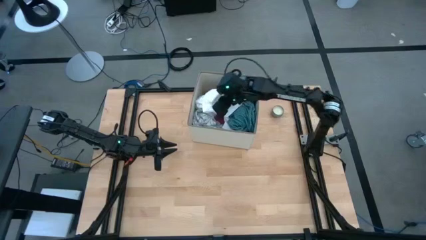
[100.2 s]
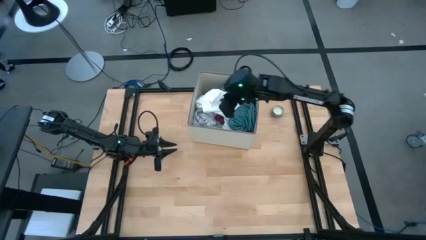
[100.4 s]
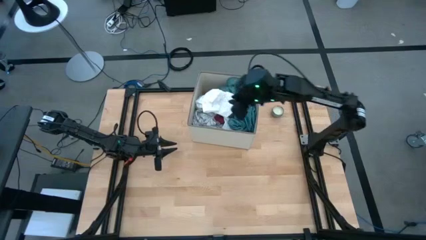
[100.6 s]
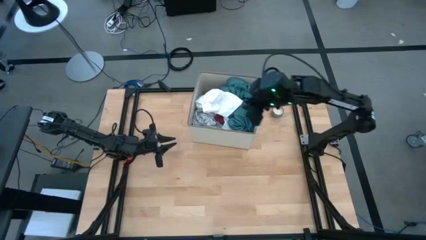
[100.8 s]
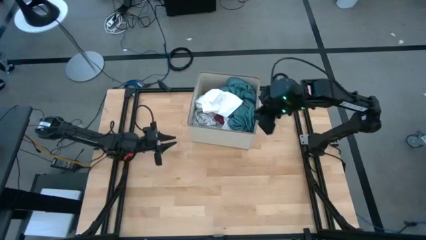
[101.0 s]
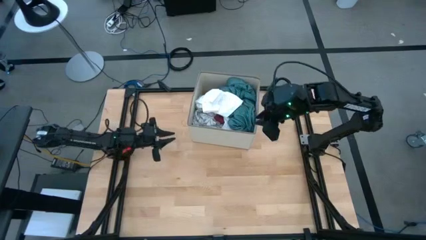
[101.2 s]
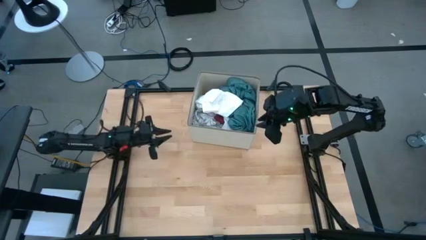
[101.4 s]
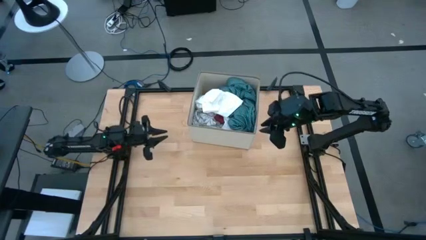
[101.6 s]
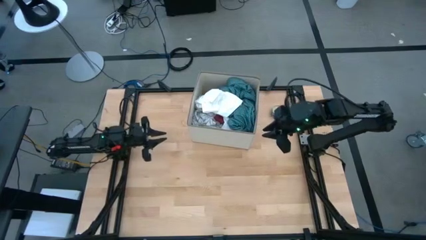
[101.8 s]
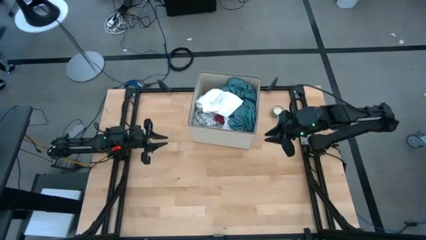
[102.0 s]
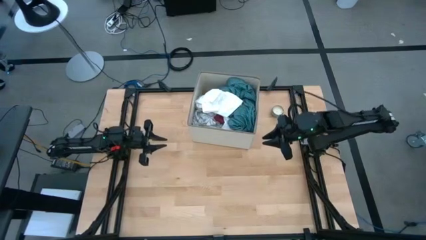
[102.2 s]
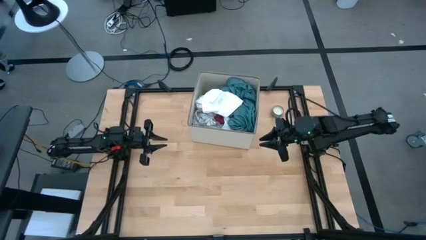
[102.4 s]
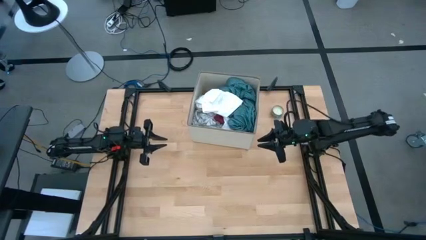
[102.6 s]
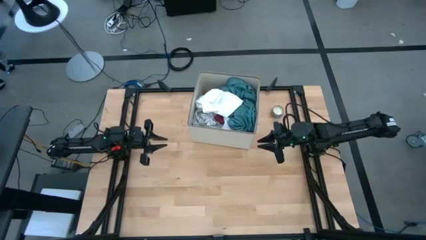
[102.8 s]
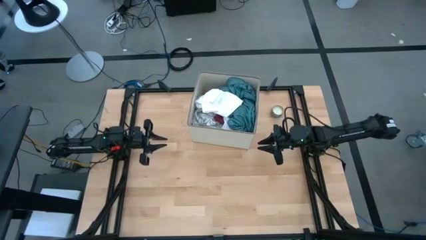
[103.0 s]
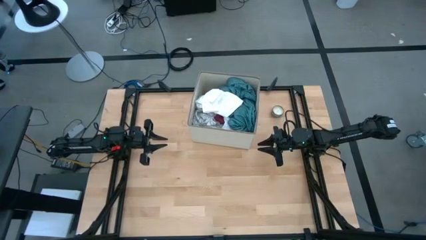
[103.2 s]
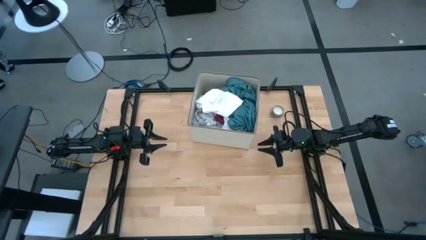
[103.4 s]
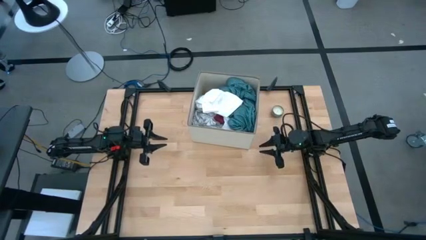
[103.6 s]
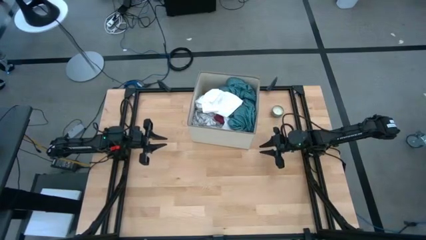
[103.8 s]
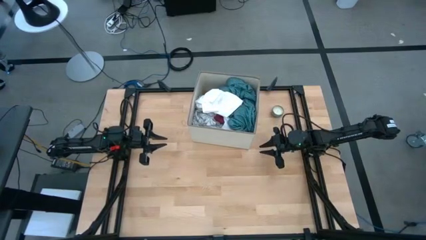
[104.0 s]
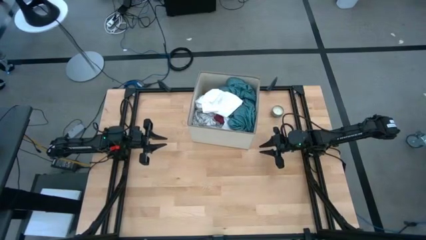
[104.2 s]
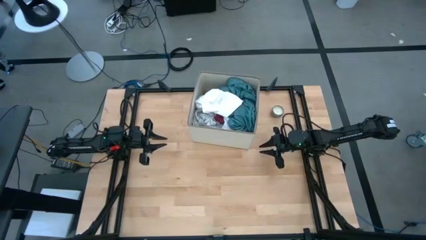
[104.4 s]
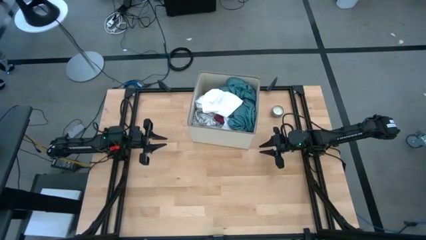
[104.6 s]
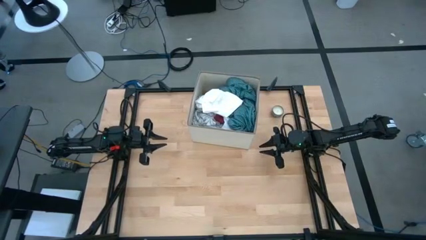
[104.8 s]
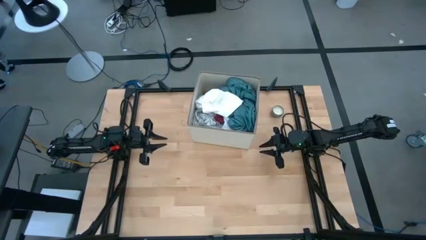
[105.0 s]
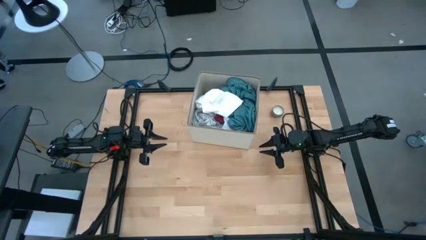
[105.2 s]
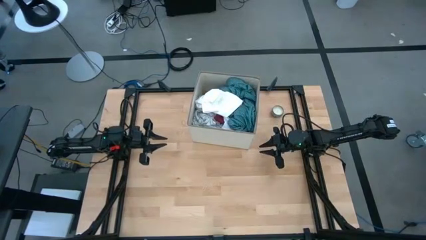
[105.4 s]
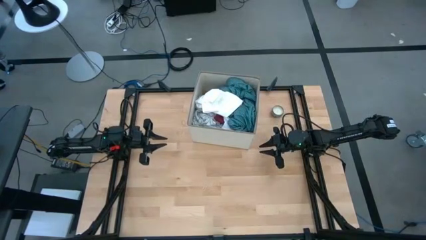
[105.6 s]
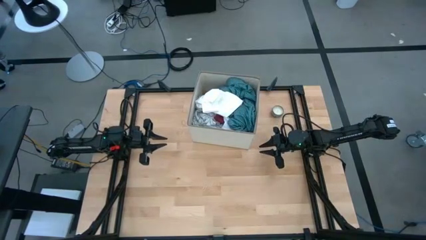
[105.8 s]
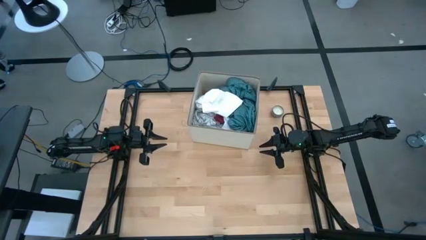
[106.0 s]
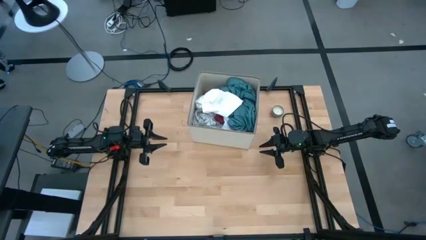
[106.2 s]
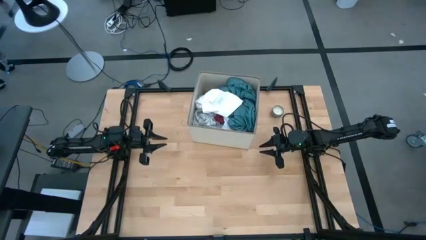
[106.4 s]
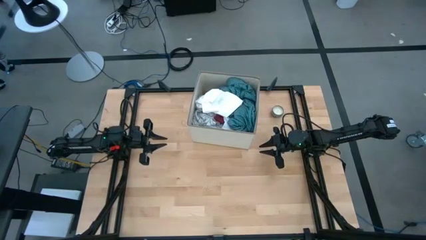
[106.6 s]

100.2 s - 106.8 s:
Task: Sort clothes
Return to Home Position

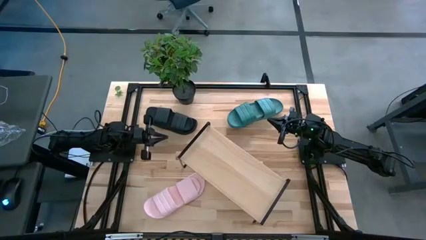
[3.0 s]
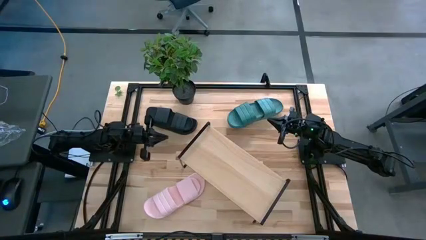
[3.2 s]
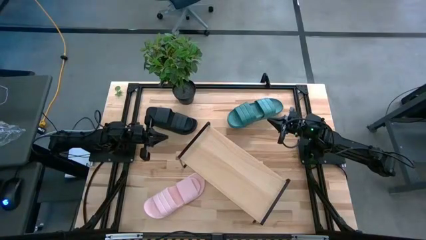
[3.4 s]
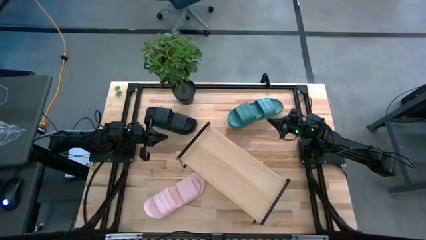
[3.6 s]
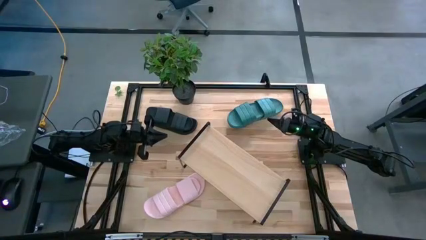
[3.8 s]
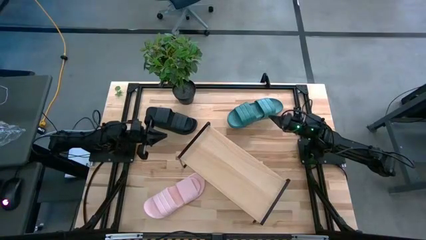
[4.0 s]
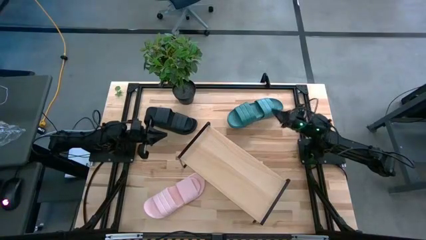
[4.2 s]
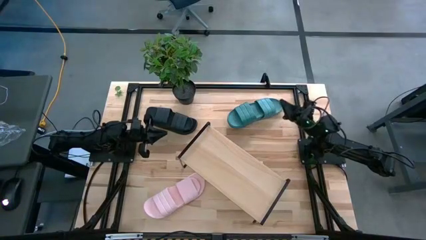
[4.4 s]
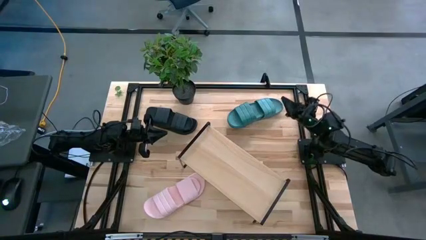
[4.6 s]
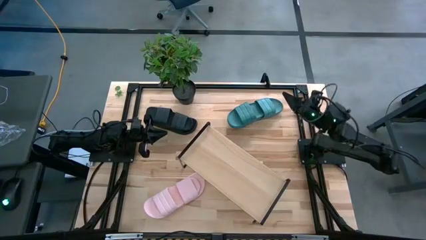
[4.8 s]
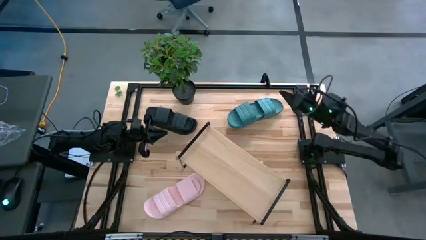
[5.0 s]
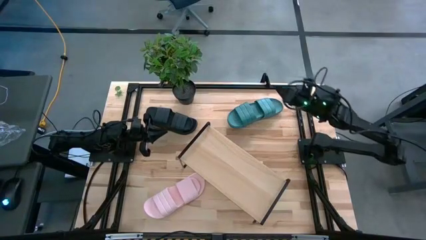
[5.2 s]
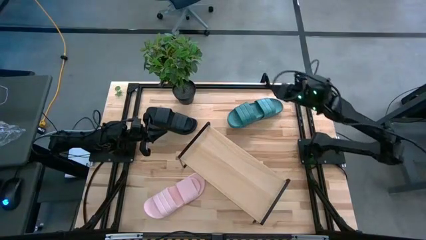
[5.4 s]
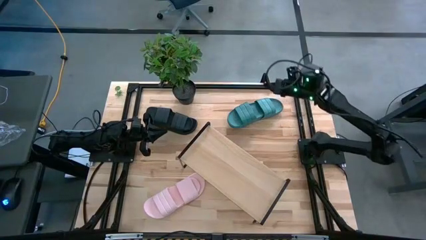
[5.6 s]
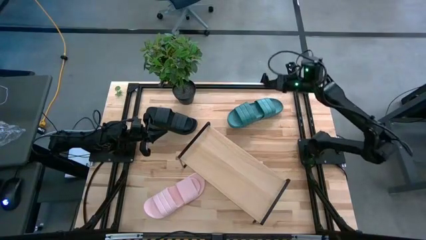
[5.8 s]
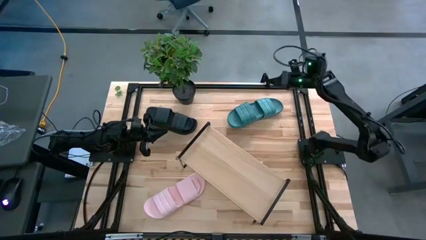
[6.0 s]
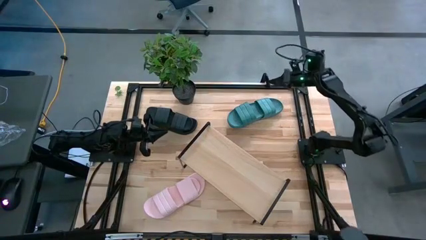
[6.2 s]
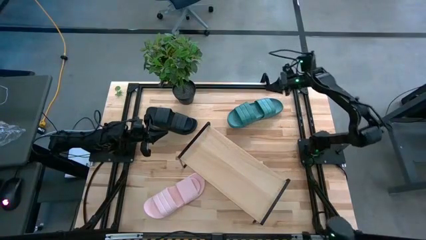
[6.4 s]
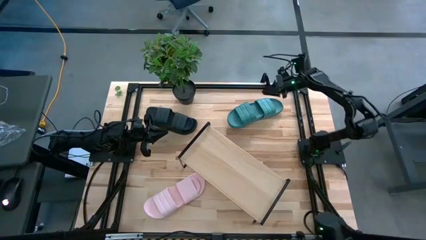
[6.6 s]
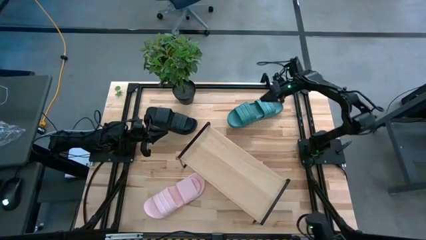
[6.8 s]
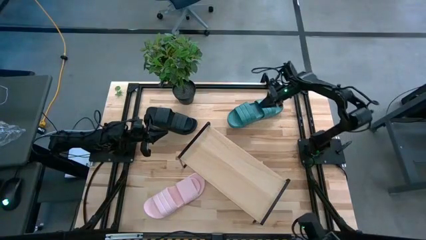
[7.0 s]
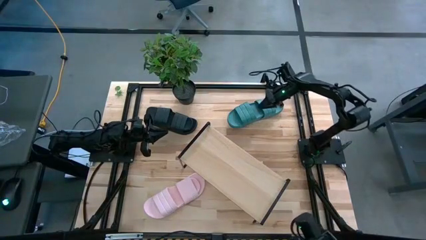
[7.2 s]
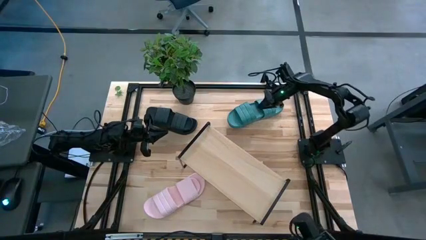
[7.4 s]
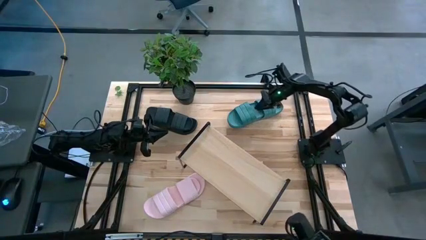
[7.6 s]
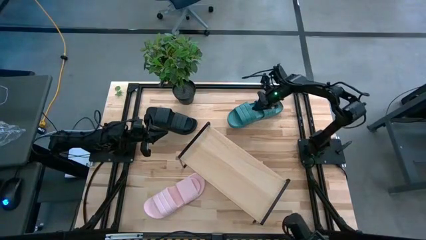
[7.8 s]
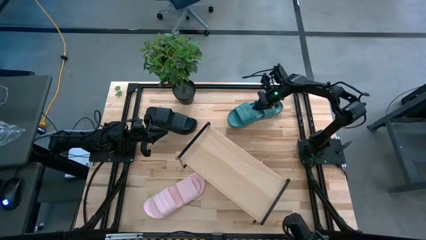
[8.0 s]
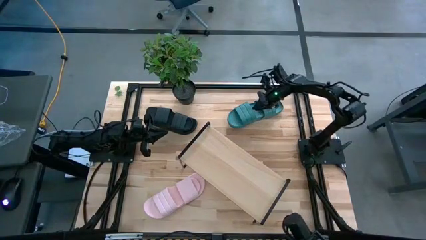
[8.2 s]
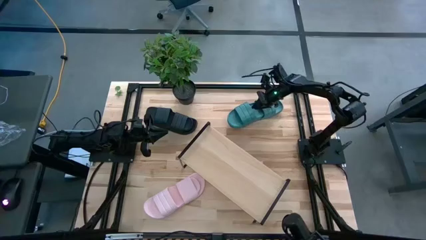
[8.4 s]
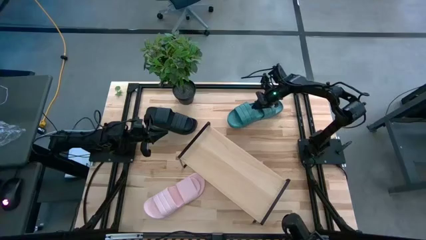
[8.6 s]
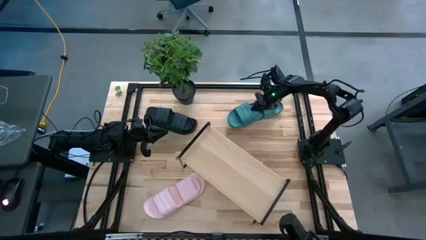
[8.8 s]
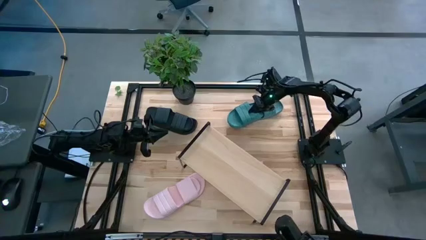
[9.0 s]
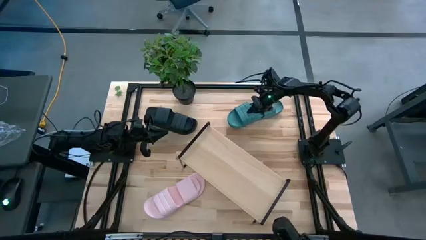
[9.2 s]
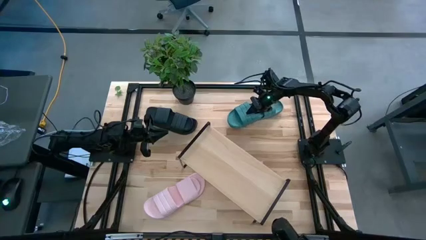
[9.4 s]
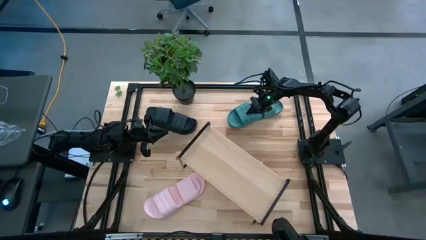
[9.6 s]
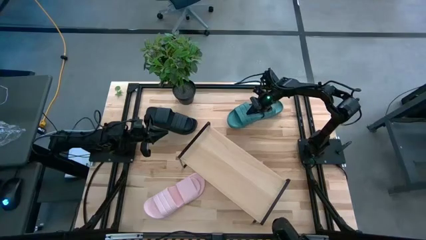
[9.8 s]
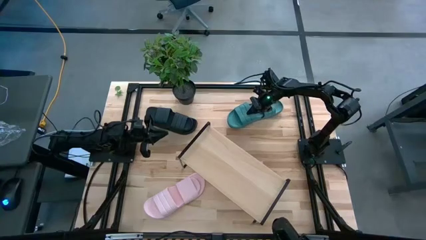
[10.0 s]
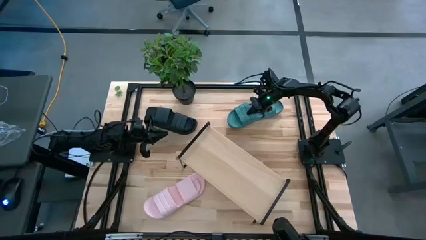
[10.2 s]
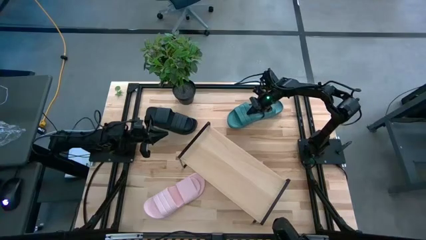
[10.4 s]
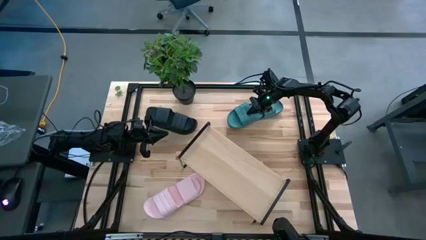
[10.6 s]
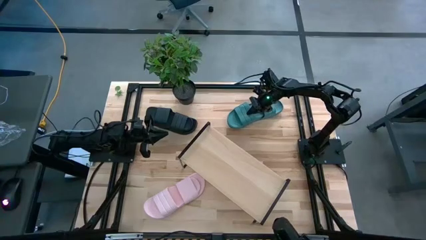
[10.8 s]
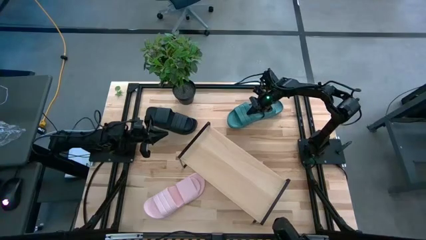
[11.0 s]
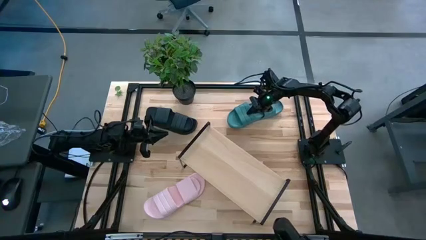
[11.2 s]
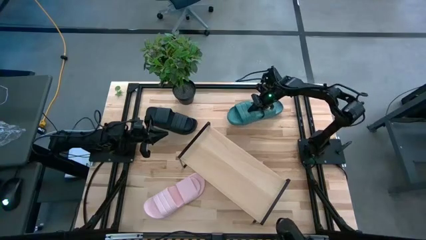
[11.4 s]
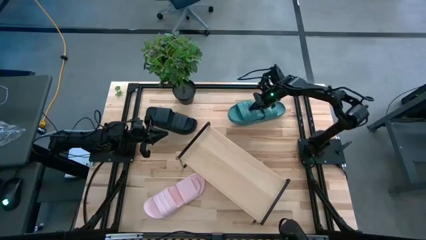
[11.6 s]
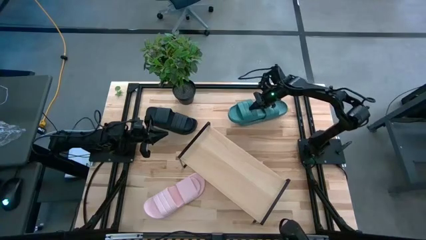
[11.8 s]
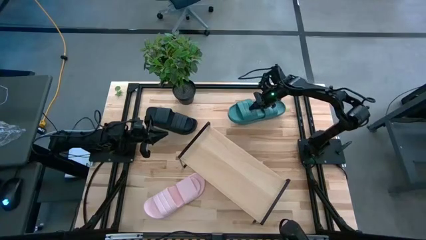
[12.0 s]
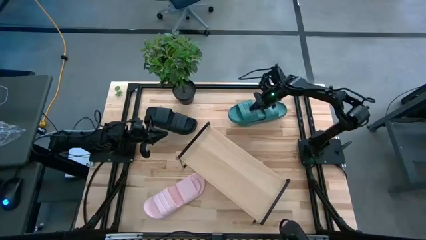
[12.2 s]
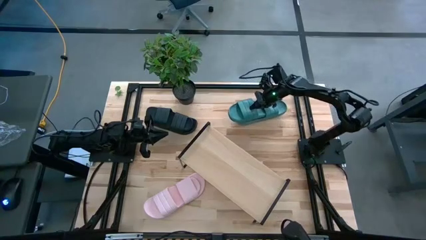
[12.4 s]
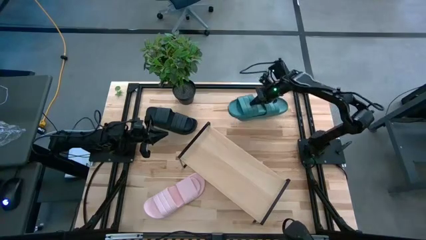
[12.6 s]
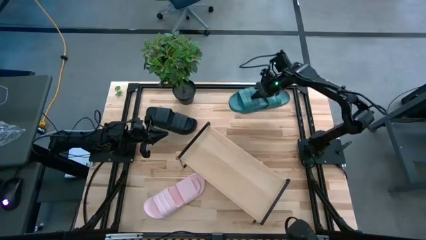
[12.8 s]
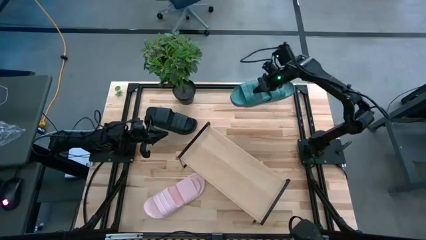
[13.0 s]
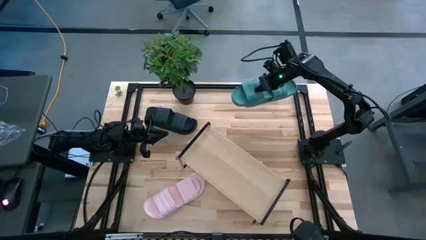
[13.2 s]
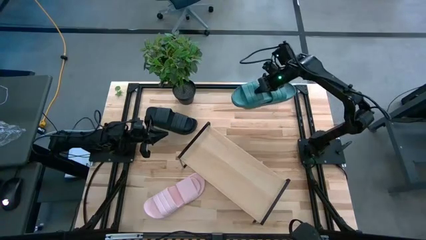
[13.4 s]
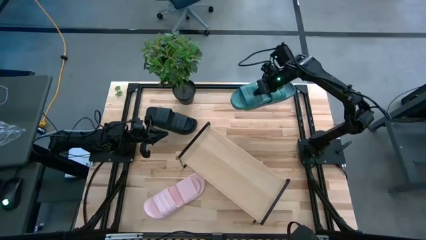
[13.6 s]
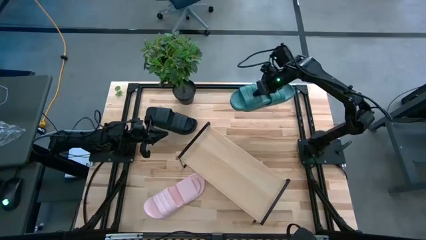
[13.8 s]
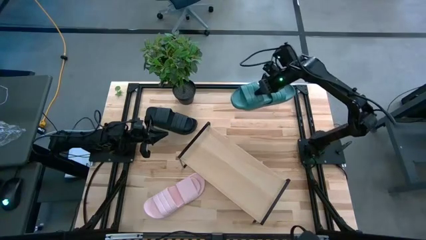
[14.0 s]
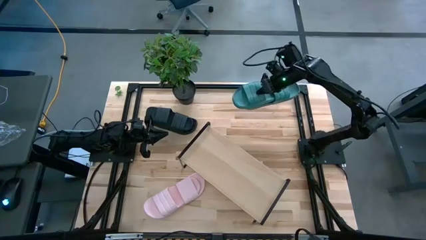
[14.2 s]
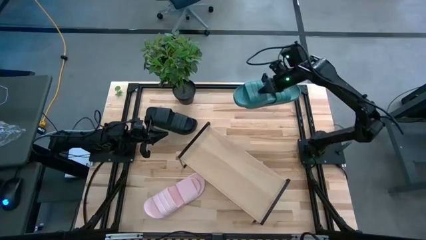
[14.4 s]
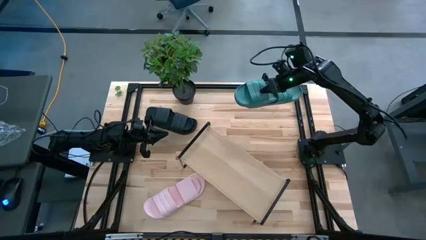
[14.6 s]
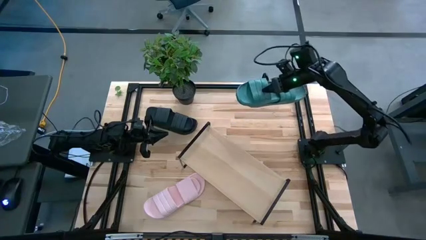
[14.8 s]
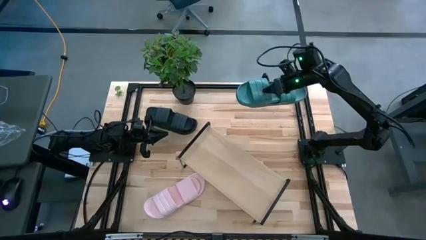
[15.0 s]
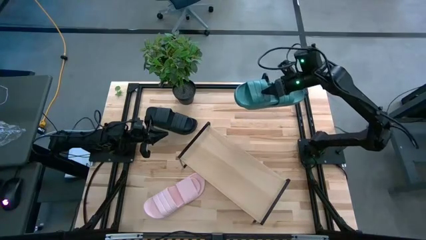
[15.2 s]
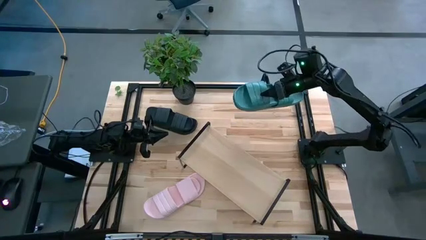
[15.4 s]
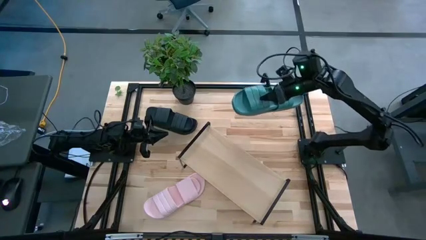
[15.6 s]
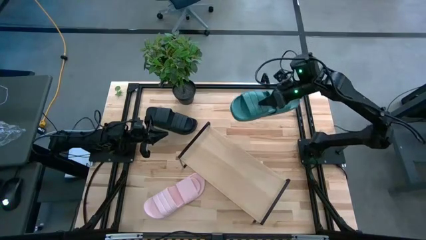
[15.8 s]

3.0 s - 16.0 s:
Task: Pick and place slides into the shelf
Put the green pair of slides on the shelf
